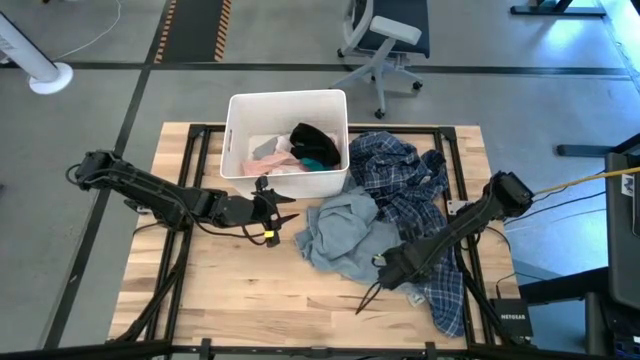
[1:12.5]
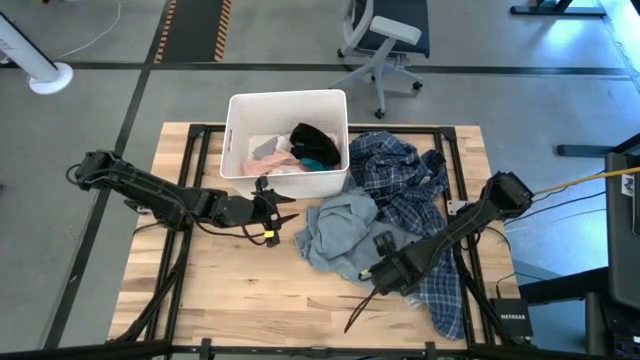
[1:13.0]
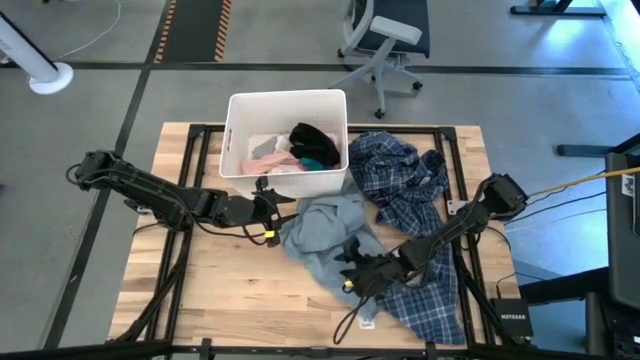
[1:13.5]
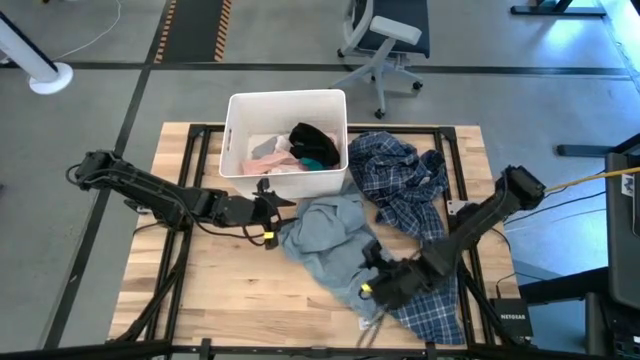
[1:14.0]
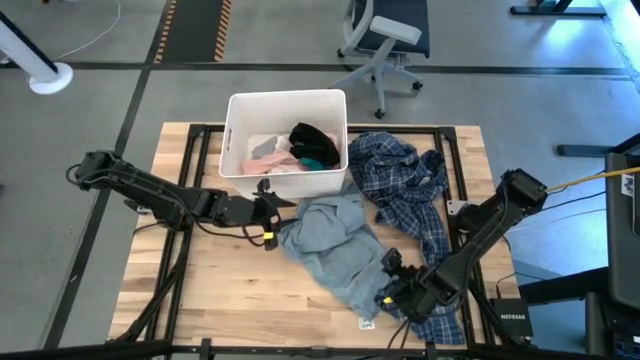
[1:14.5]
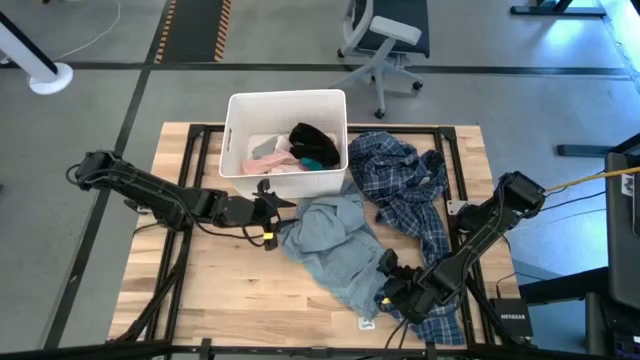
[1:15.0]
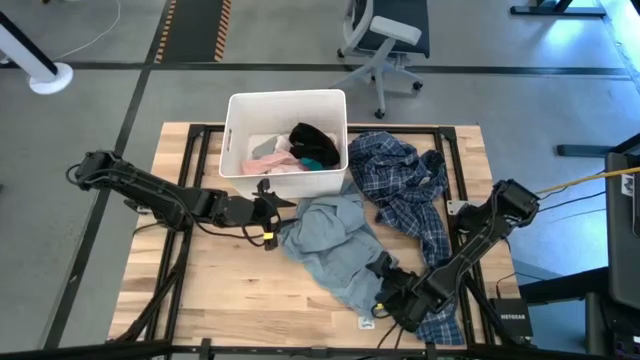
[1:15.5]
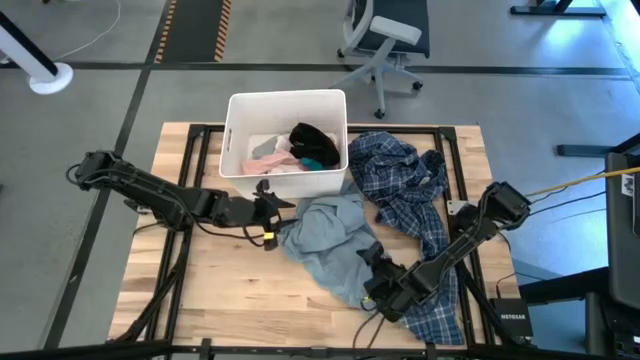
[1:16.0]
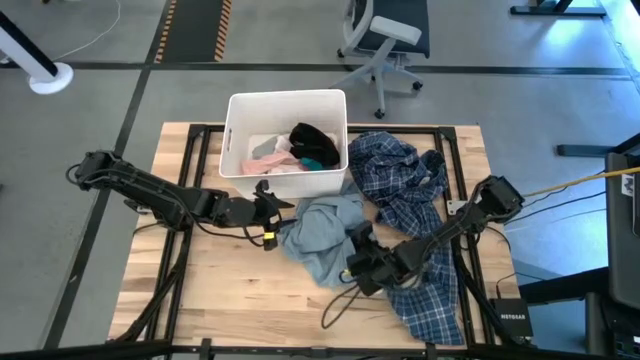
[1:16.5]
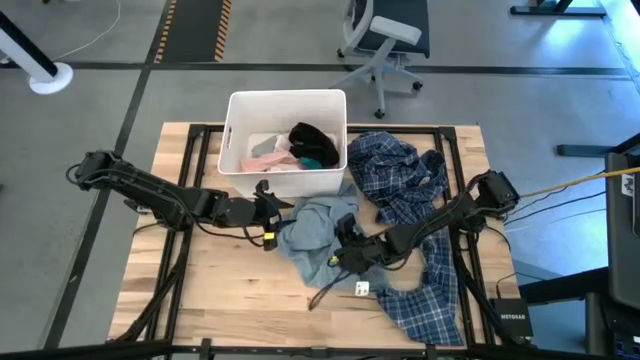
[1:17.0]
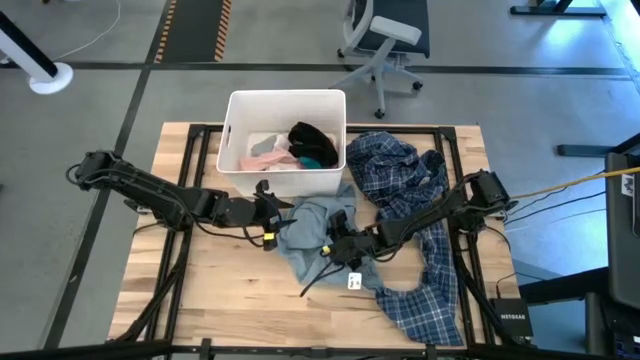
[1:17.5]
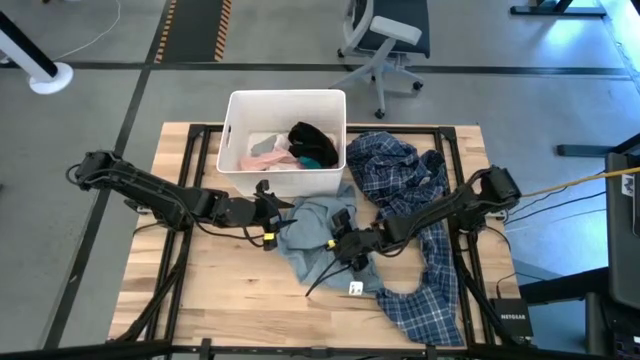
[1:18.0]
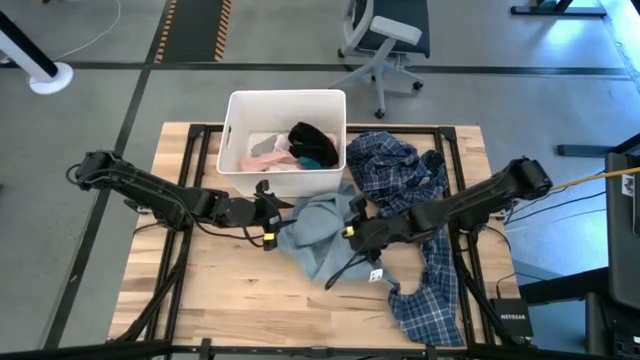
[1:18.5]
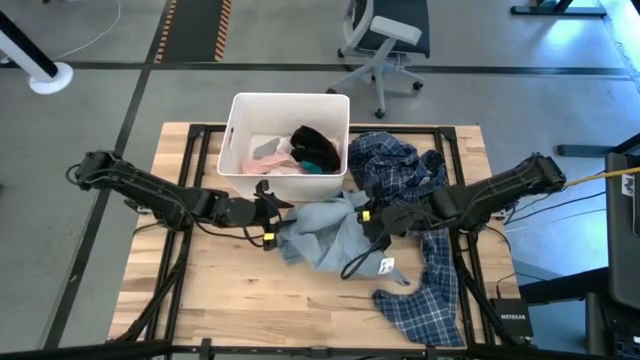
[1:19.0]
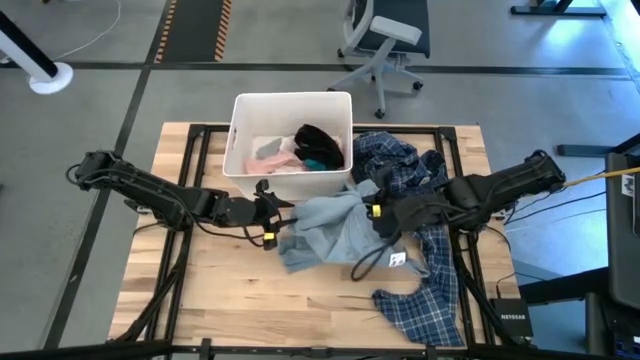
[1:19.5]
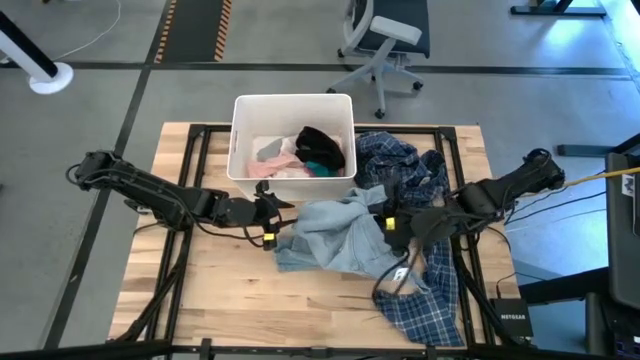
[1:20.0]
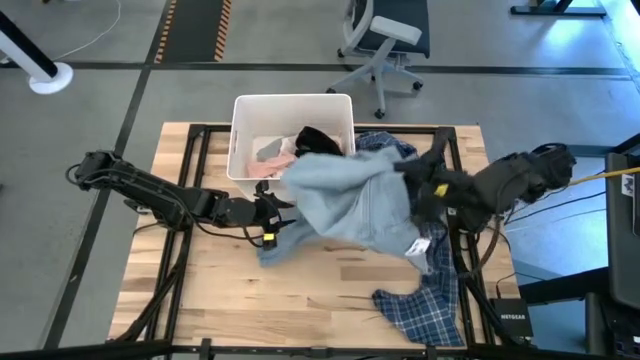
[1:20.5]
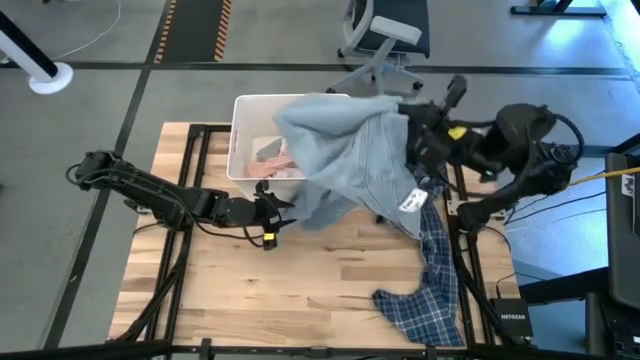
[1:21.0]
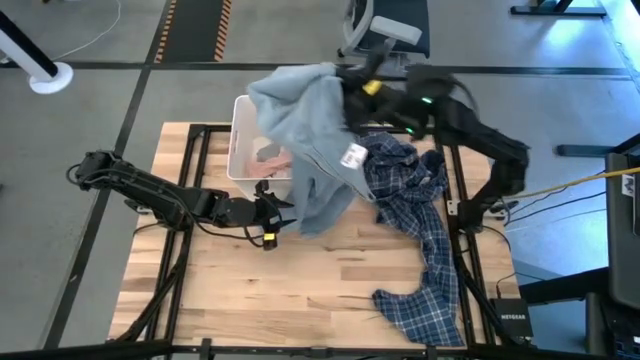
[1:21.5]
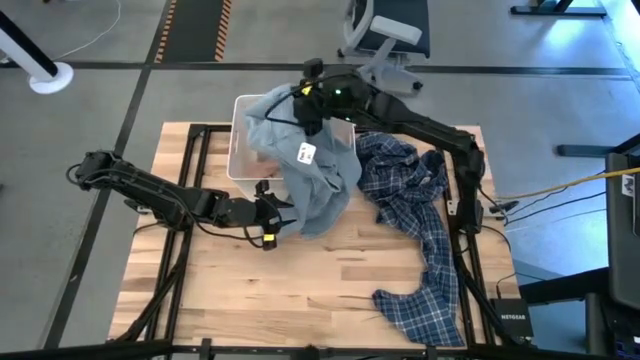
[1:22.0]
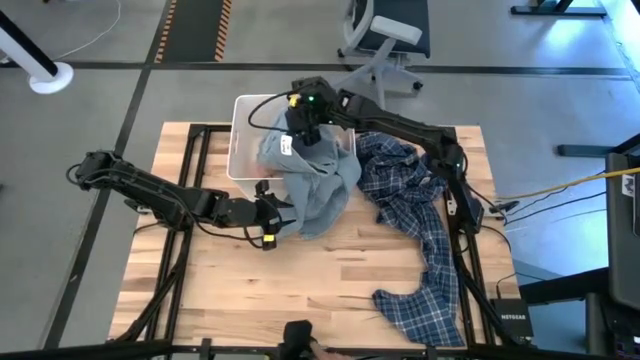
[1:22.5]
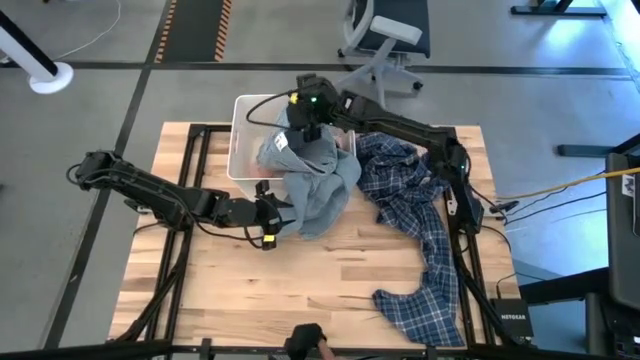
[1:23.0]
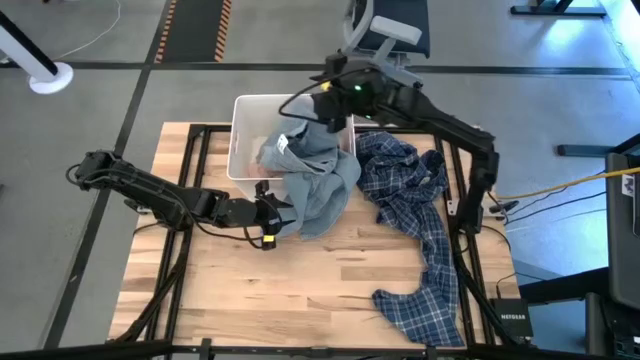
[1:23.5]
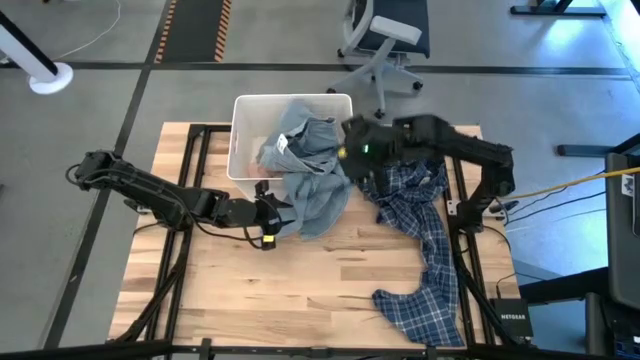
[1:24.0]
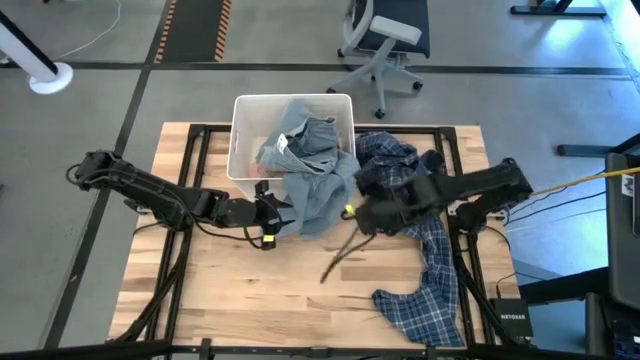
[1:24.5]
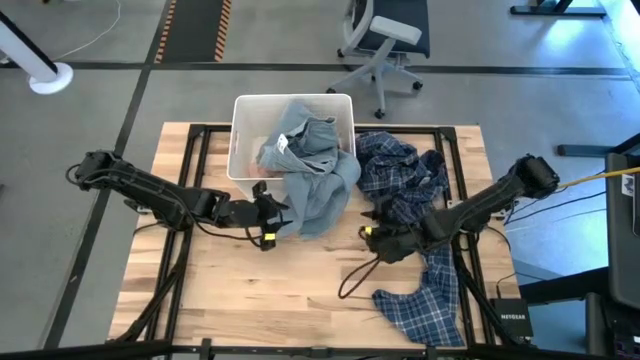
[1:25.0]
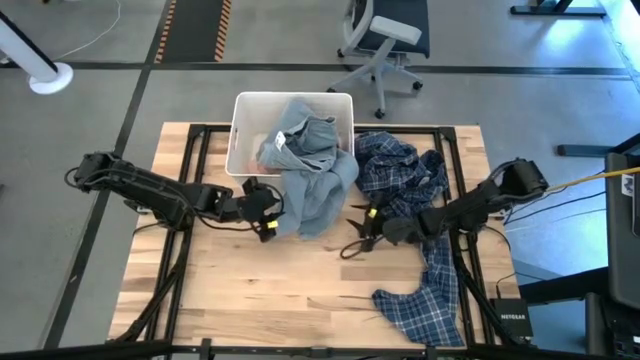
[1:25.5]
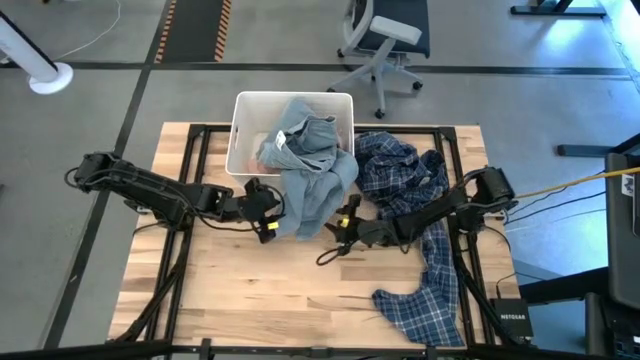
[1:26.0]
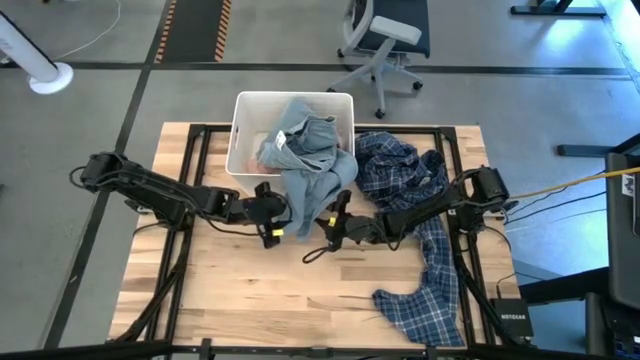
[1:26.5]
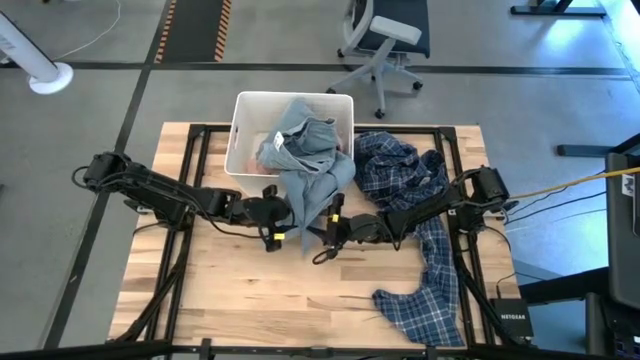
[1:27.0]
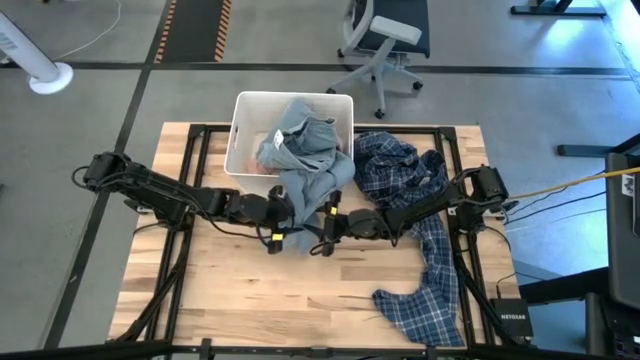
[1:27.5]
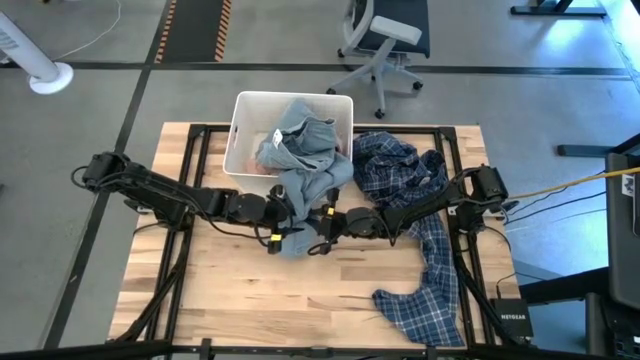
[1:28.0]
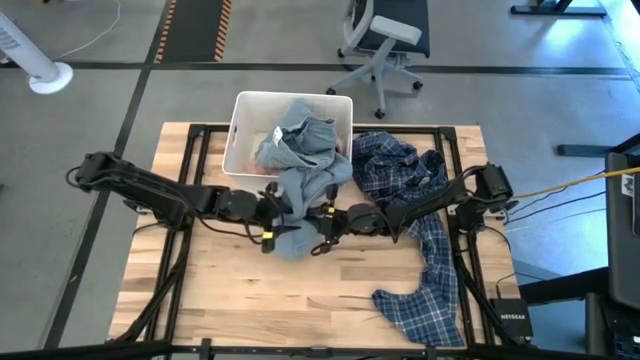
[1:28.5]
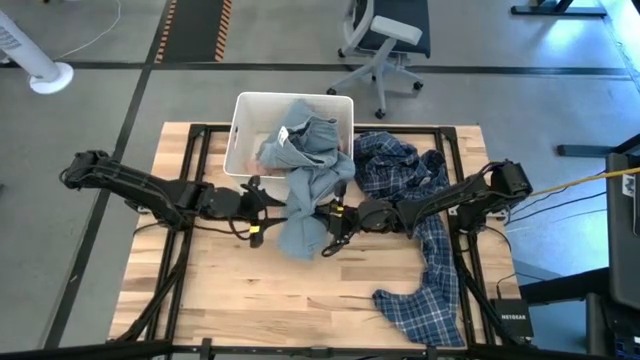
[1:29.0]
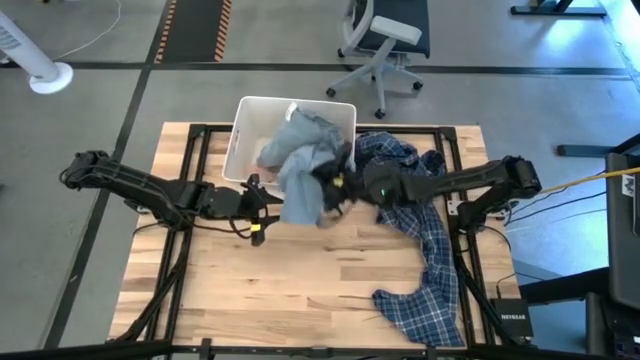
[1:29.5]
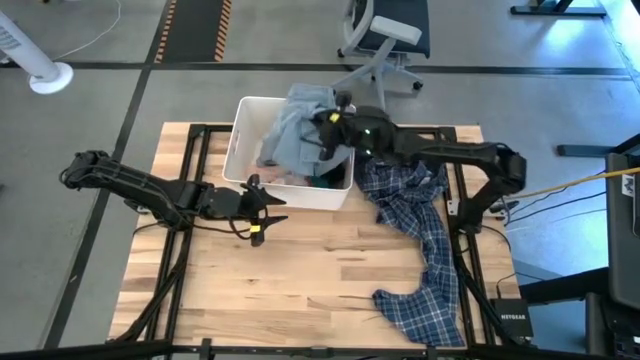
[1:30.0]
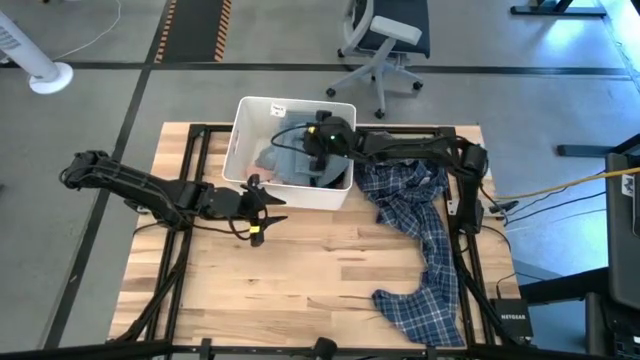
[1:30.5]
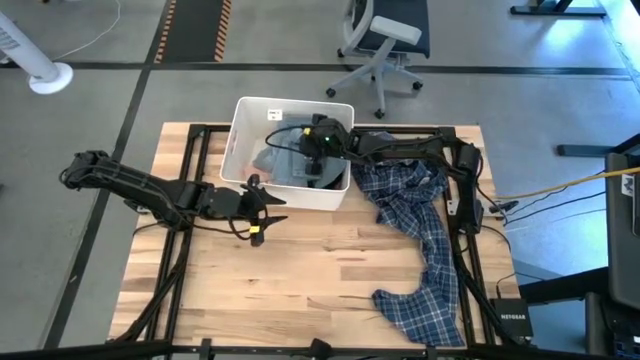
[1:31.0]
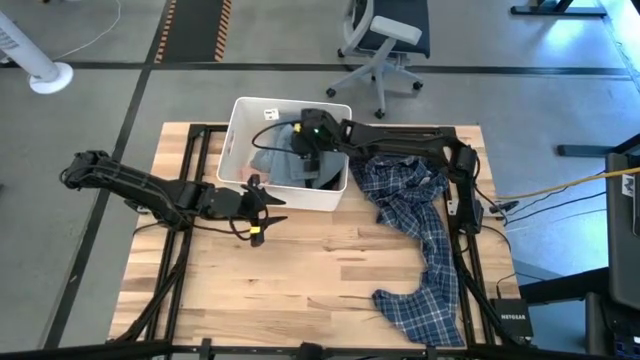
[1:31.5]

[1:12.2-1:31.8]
Task: Sort clothes
Put the blue jeans into the white bin

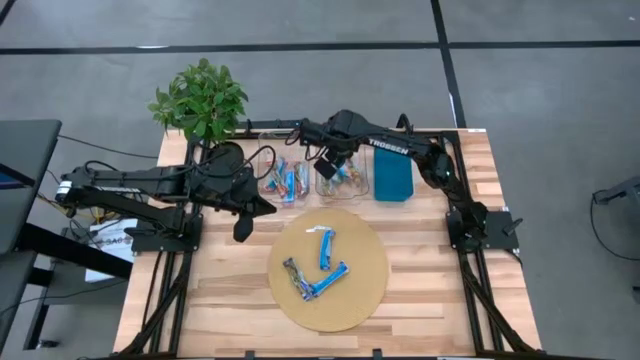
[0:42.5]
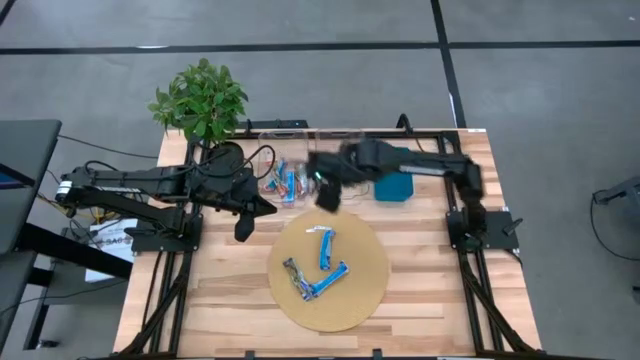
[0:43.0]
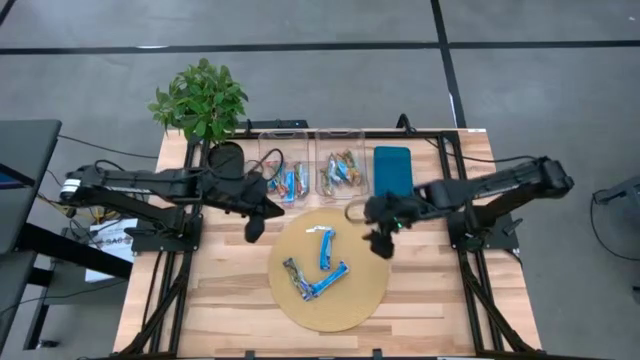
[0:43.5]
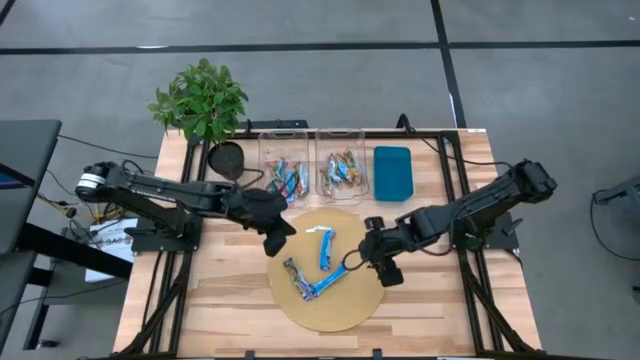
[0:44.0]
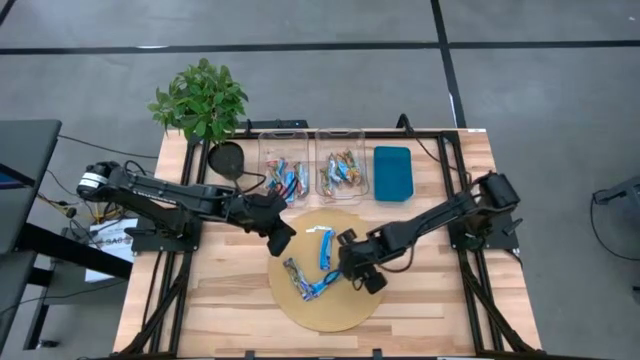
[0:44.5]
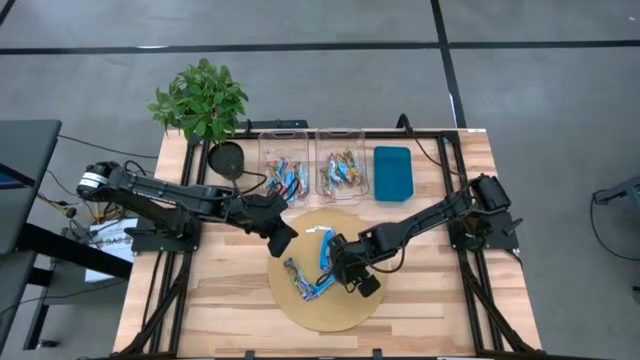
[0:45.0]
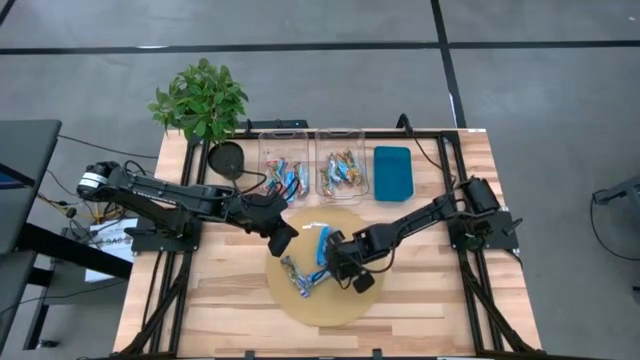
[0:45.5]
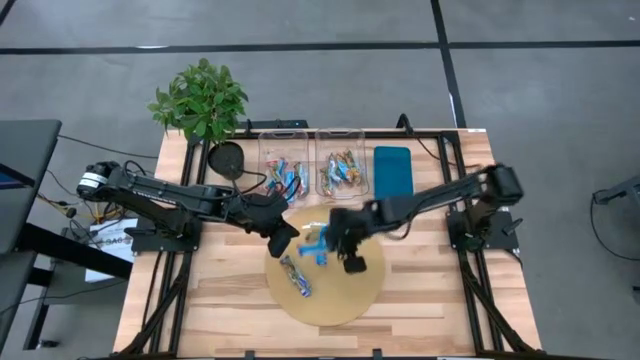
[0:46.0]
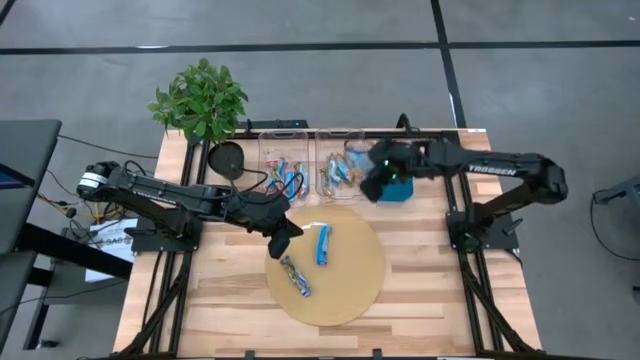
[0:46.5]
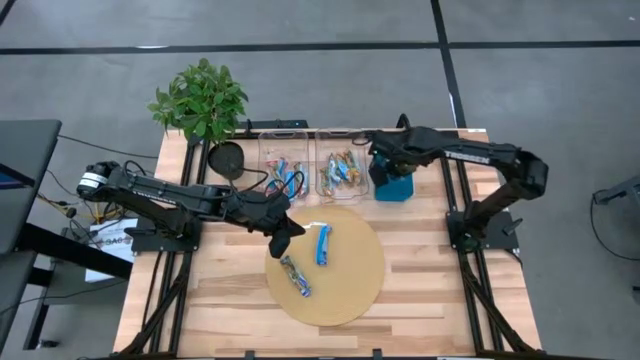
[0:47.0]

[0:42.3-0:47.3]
Task: Pick and place Granola Bars by type
Put the bottom right blue granola bar into the blue bin
